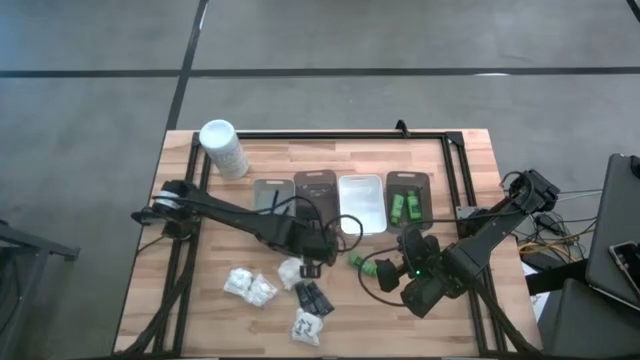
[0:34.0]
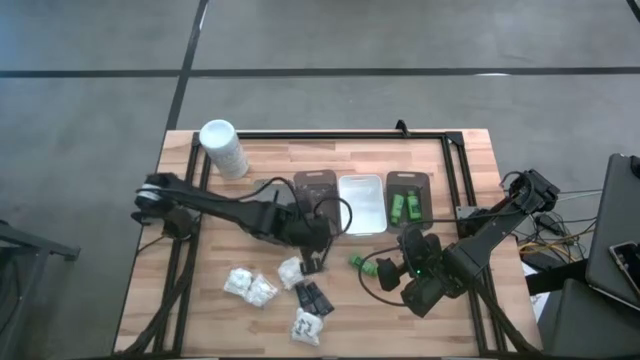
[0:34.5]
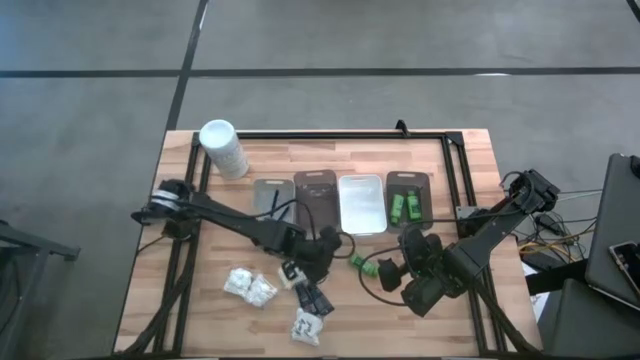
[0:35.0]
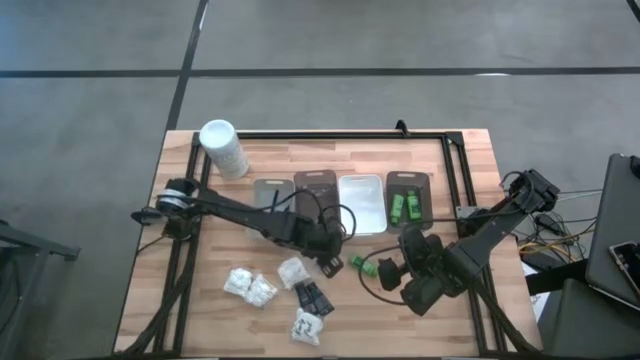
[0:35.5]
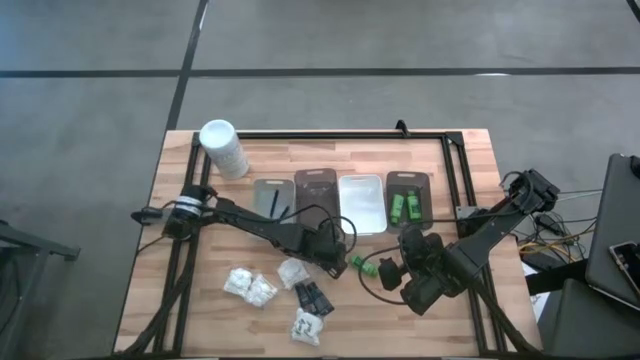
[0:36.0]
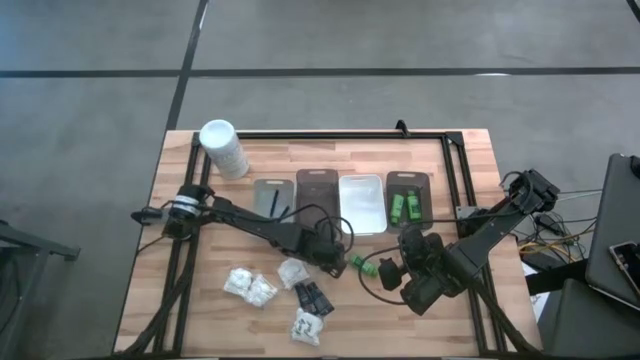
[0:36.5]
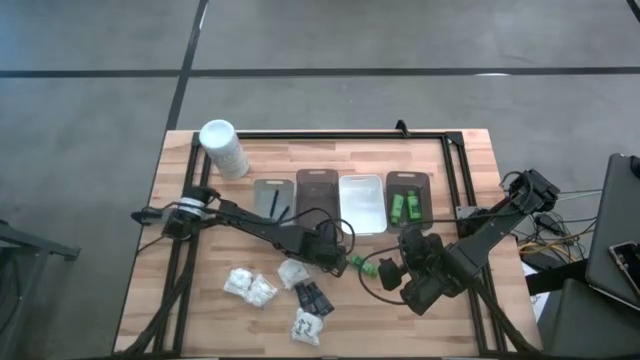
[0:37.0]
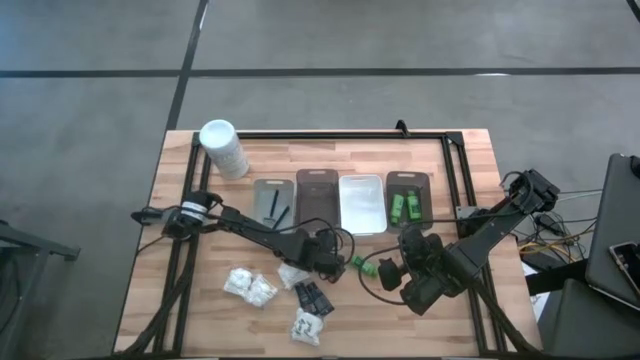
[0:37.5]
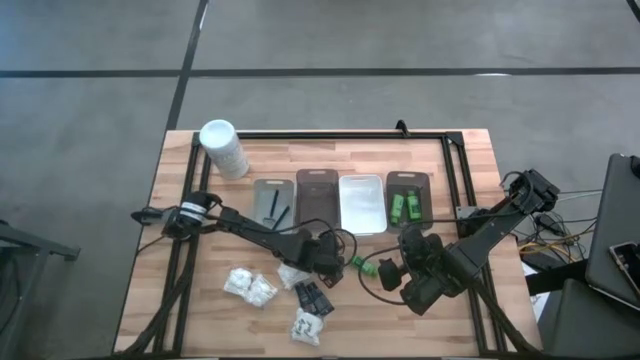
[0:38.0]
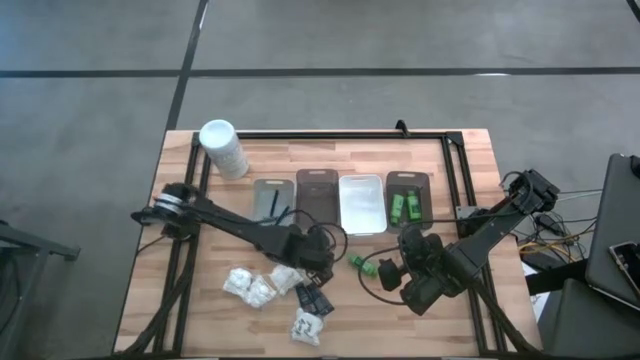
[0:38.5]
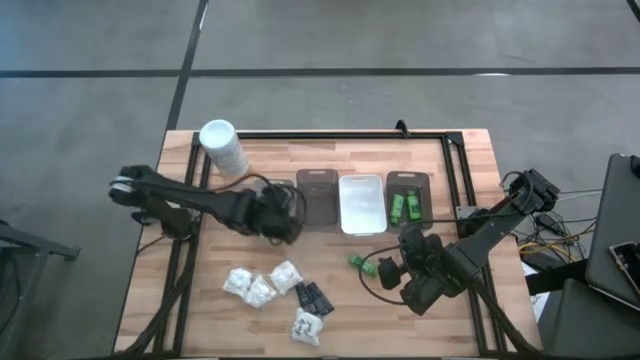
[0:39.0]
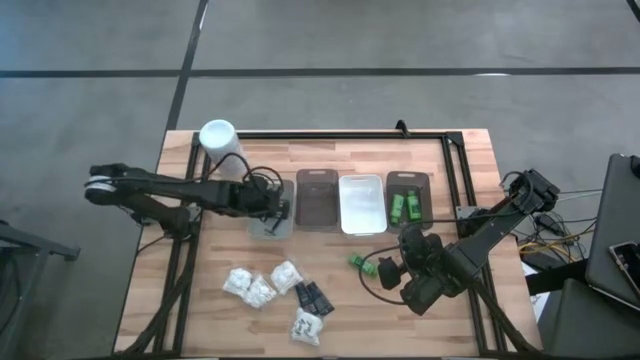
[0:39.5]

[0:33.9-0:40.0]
Task: Pick & Place Travel size toiletries
Put the blue razor into the gray bin

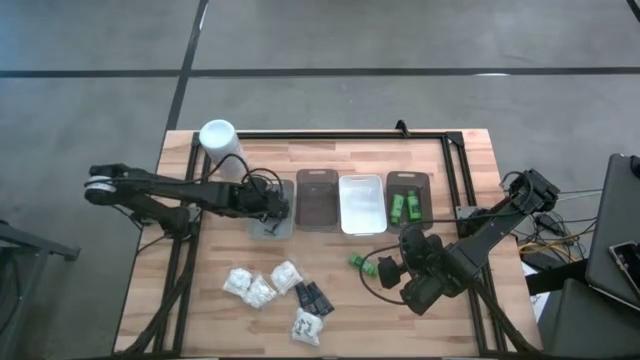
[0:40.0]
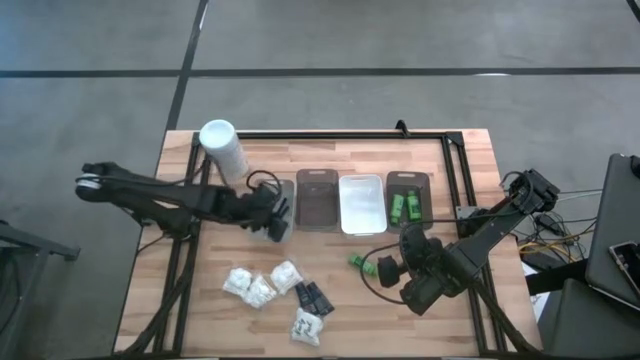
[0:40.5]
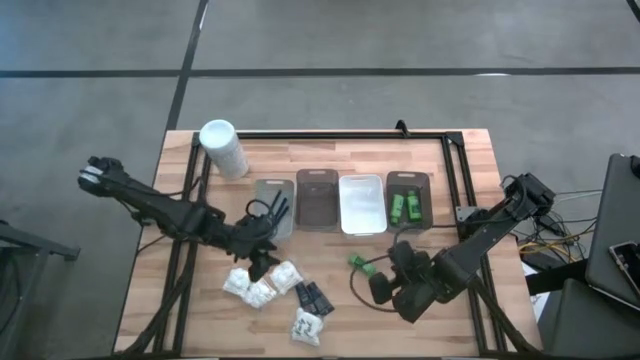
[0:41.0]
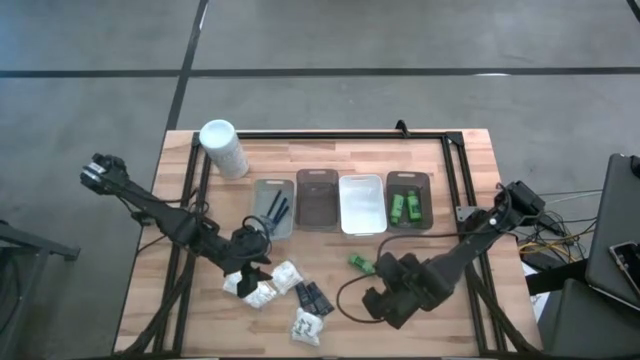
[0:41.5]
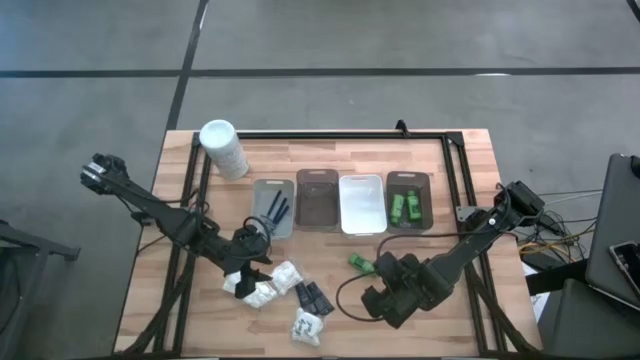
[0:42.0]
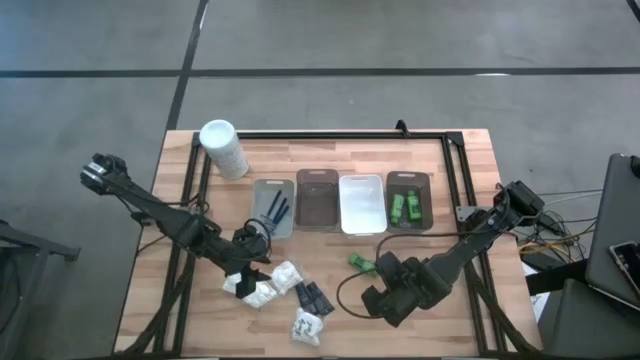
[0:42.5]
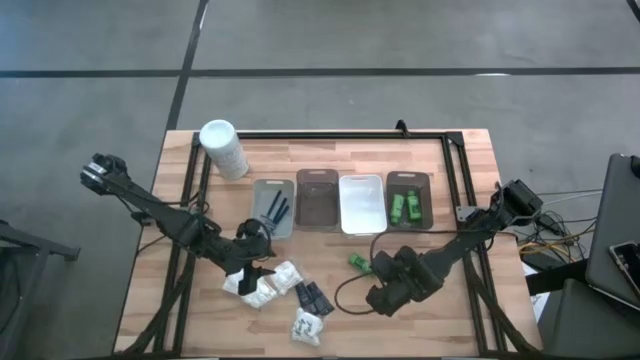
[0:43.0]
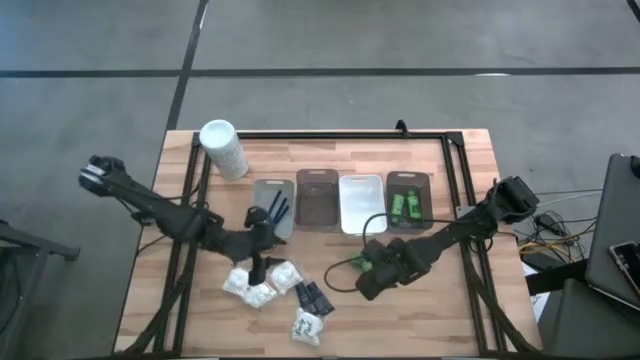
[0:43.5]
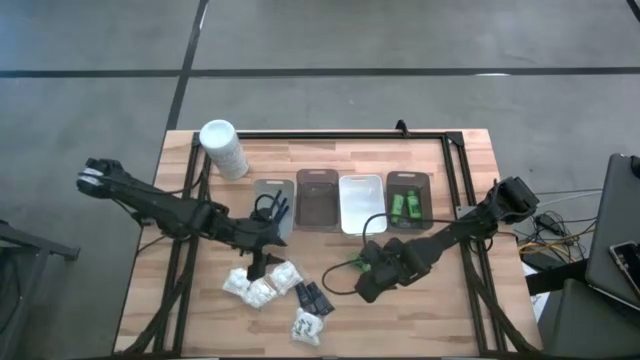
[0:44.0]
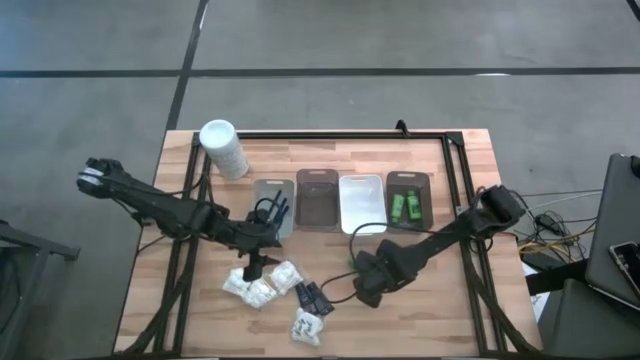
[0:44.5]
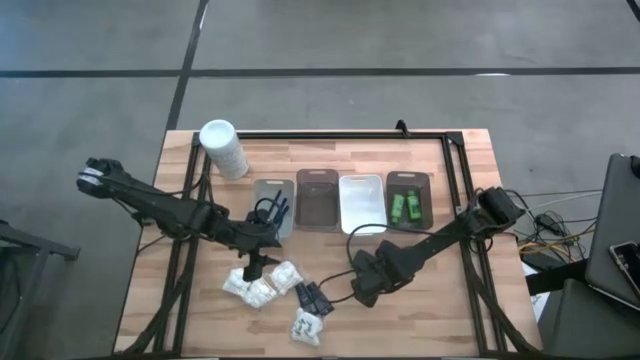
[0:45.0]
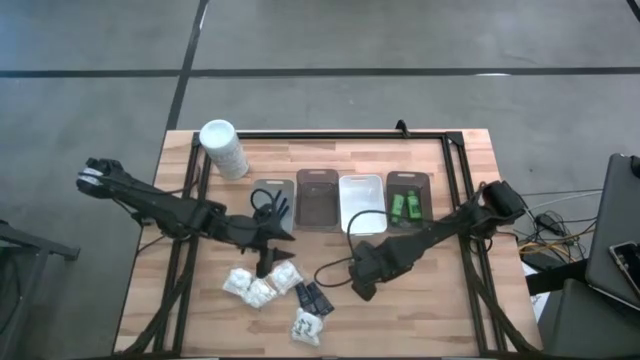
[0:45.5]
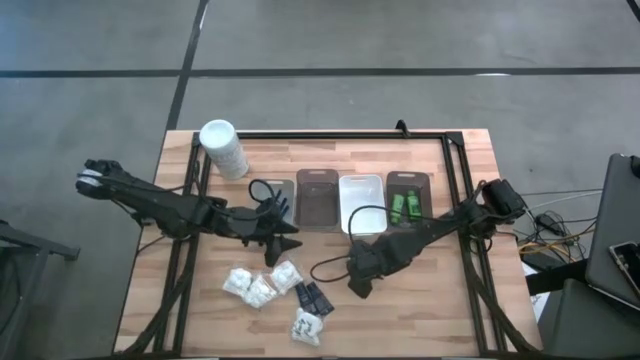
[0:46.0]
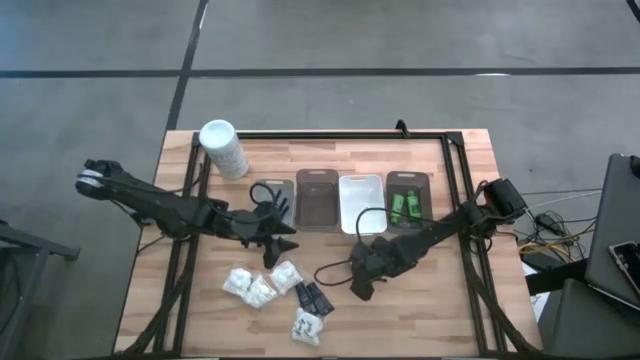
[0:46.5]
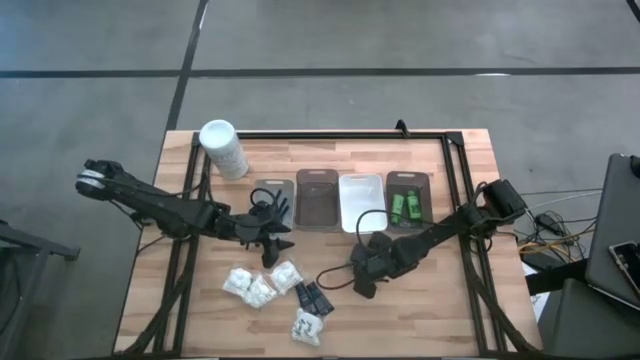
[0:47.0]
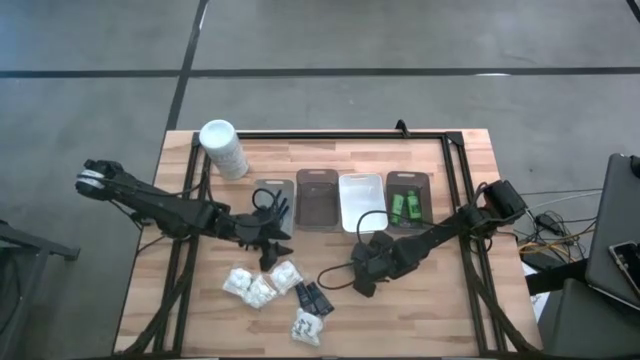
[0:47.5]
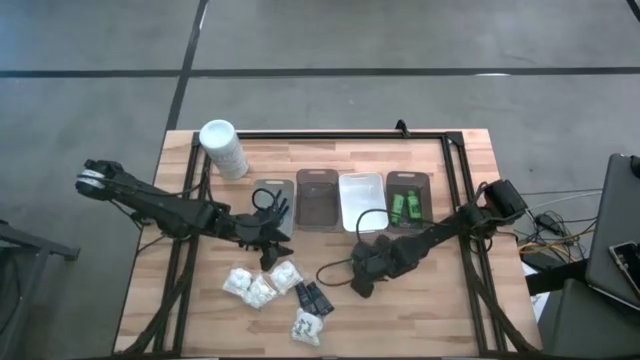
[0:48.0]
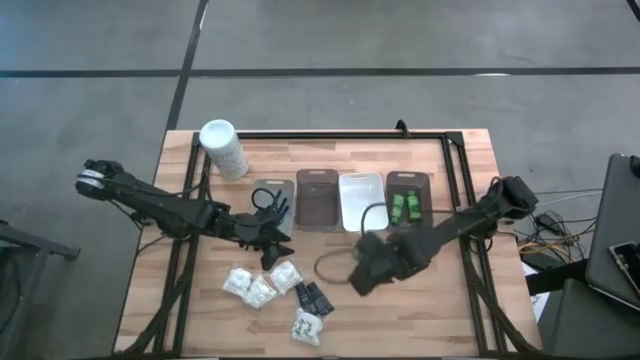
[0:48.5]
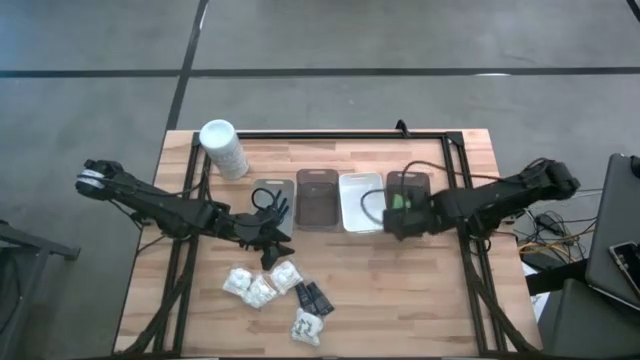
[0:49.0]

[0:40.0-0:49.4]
Put the green shampoo bottle into the right black bin

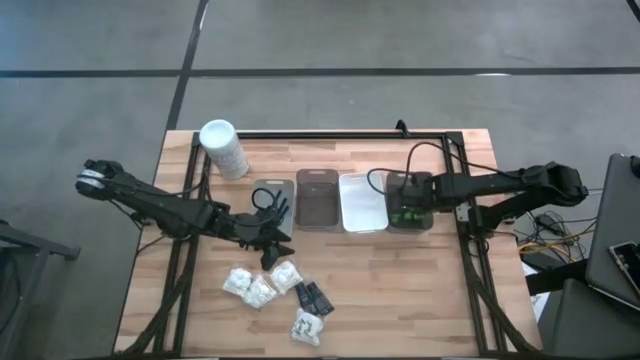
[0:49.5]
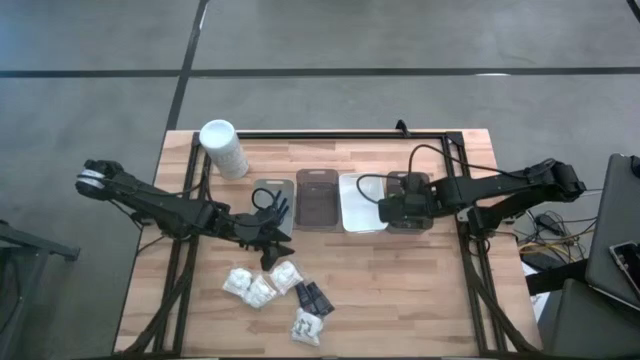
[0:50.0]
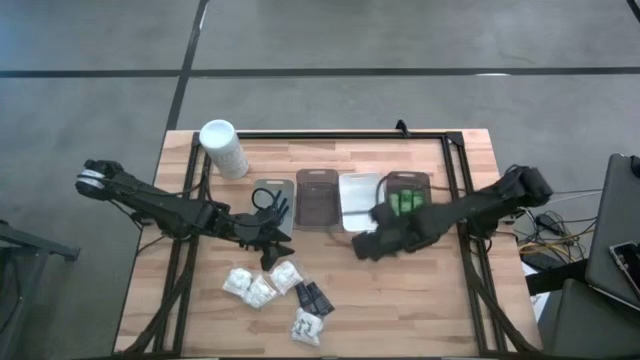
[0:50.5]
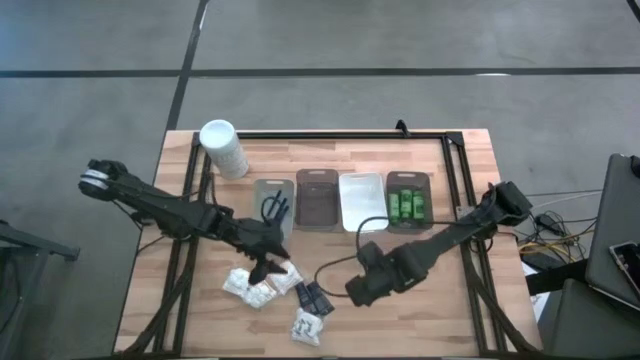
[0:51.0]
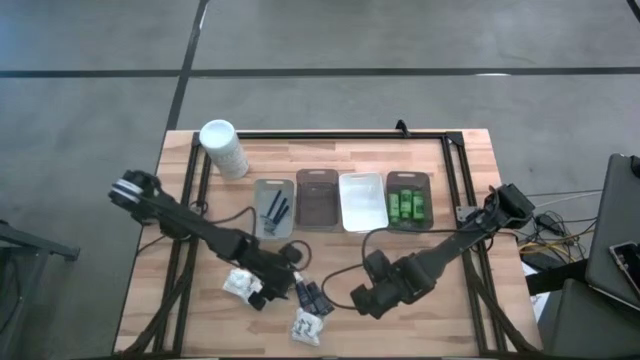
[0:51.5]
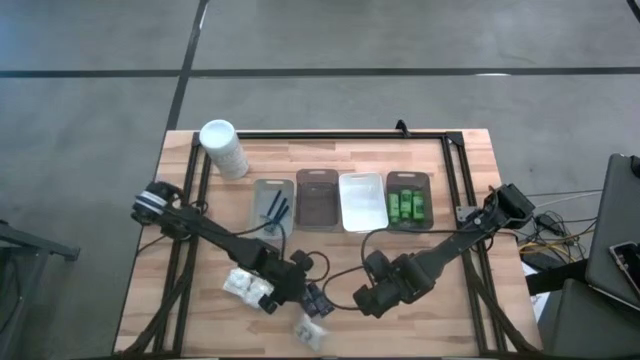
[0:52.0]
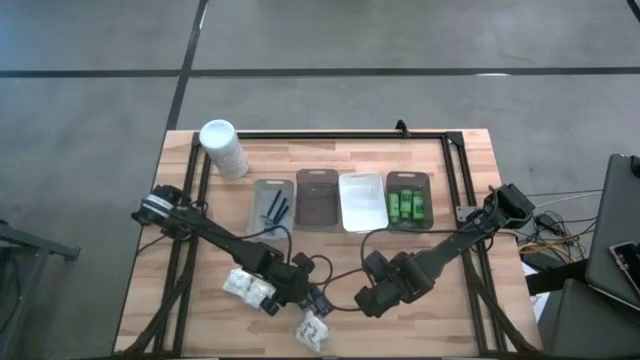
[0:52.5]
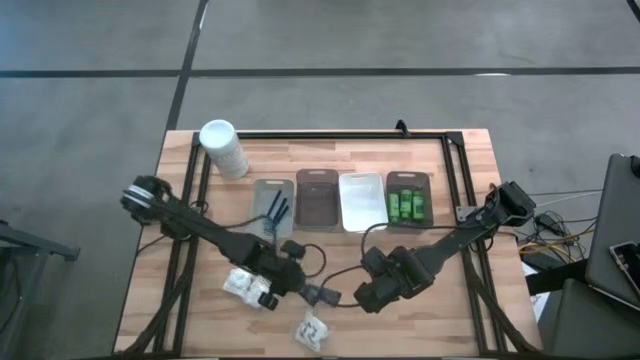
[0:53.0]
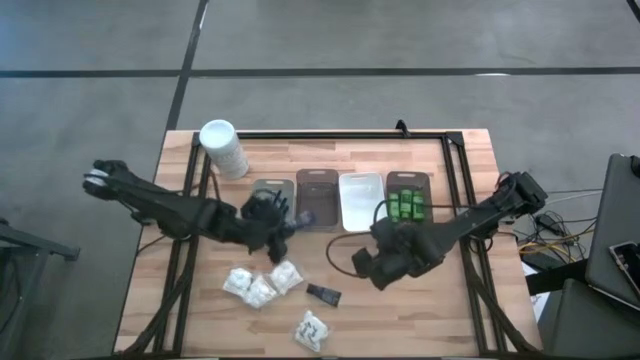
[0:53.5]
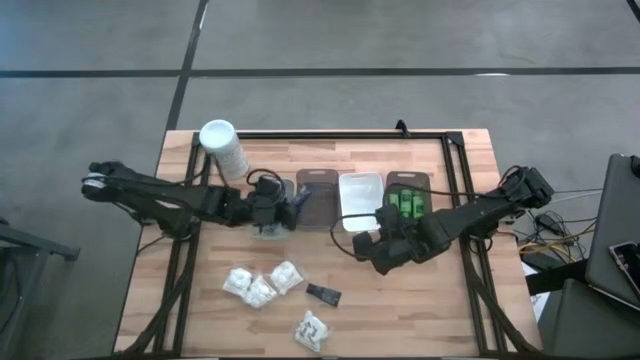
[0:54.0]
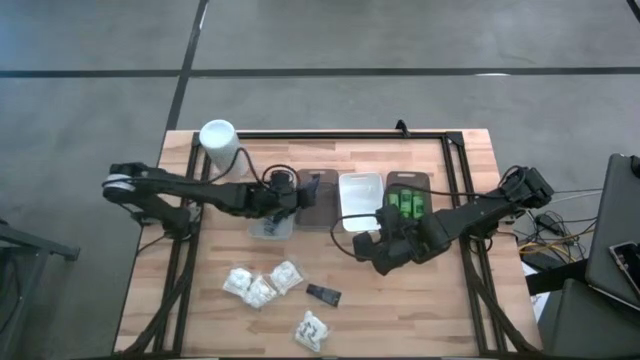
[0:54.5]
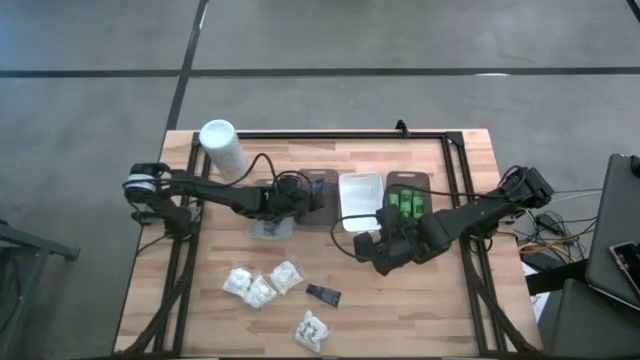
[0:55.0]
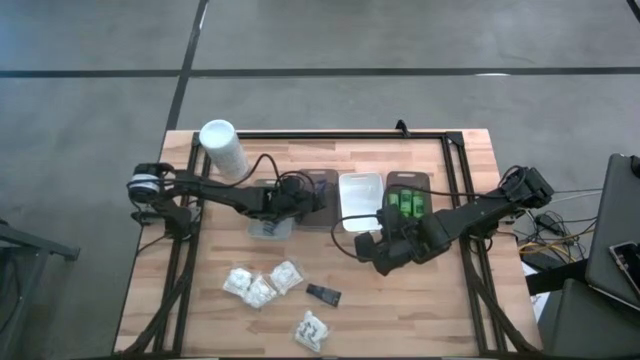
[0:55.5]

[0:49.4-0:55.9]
Put the blue shaving cream into the left black bin

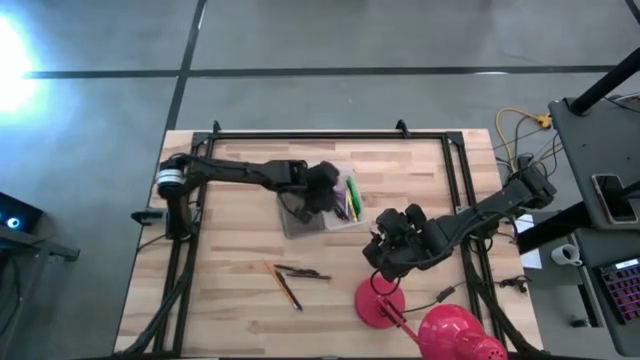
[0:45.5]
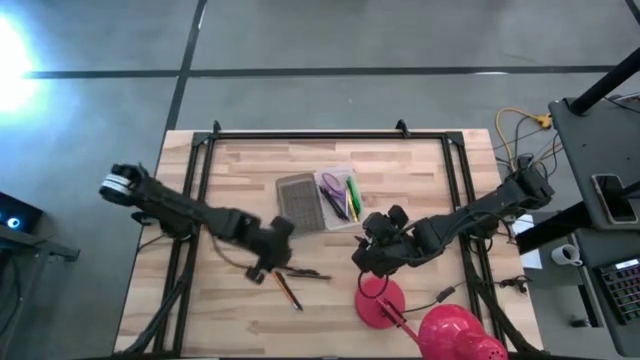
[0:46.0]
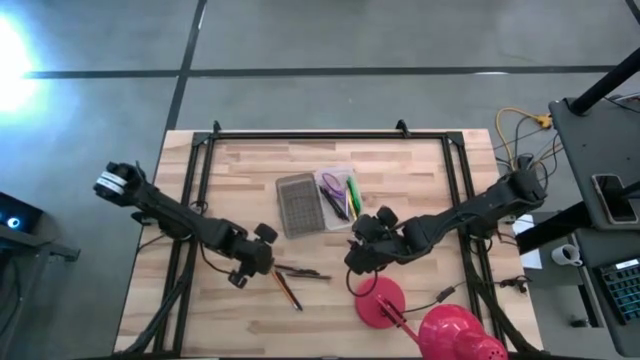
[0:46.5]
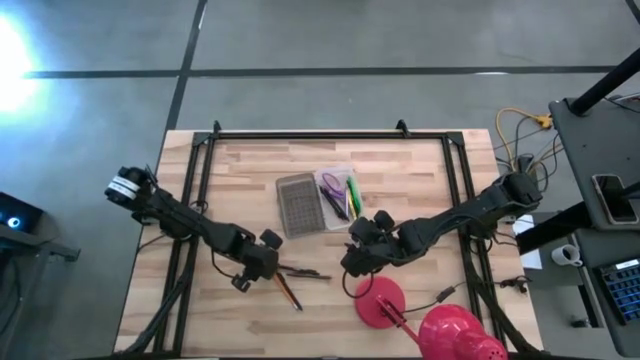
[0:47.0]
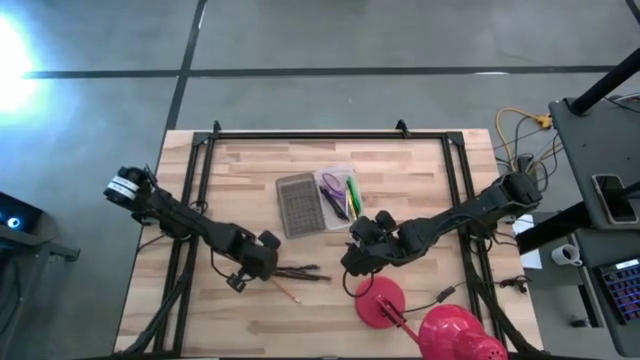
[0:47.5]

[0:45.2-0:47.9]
Task: Pick & place school supplies into a supply box
Put the orange pencil into the black supply box
